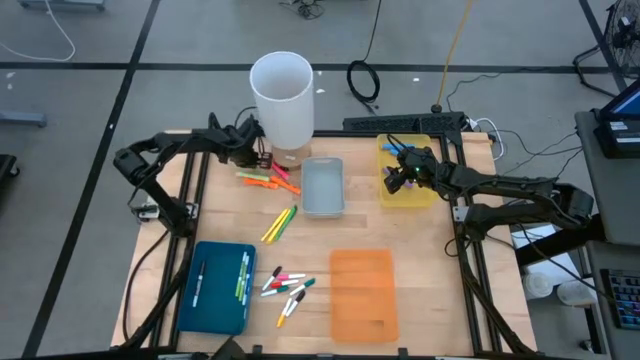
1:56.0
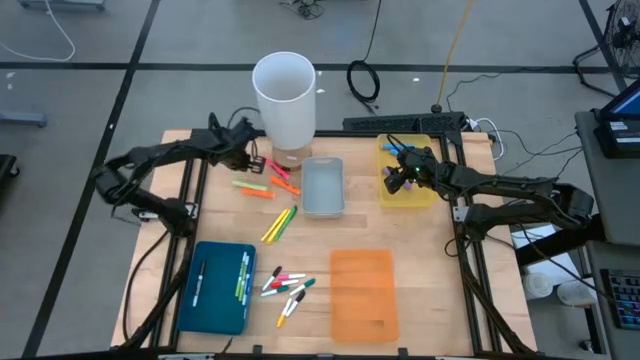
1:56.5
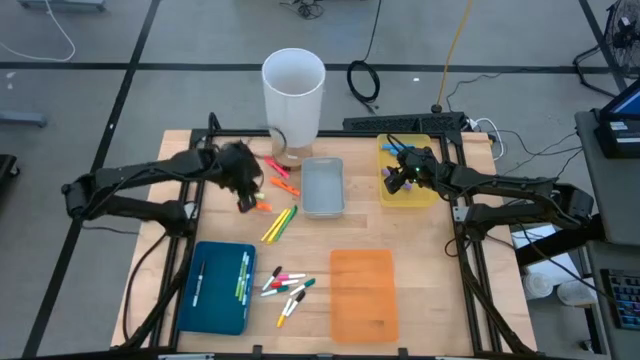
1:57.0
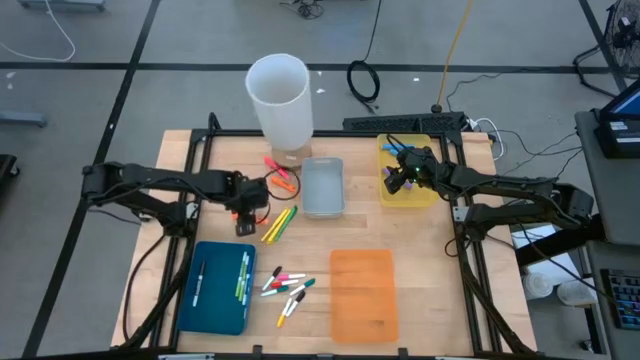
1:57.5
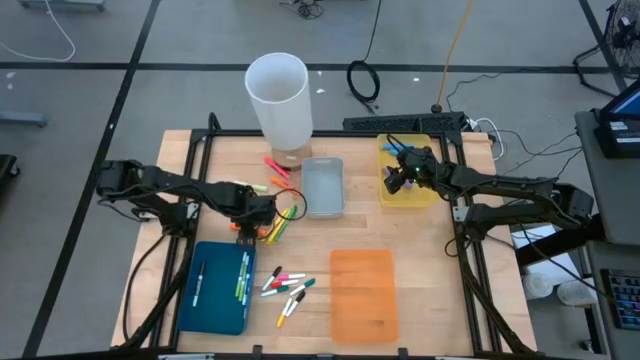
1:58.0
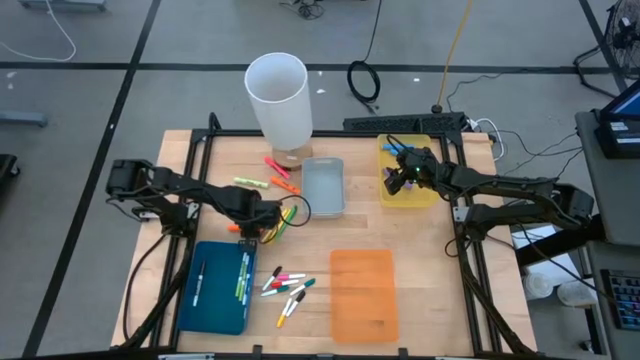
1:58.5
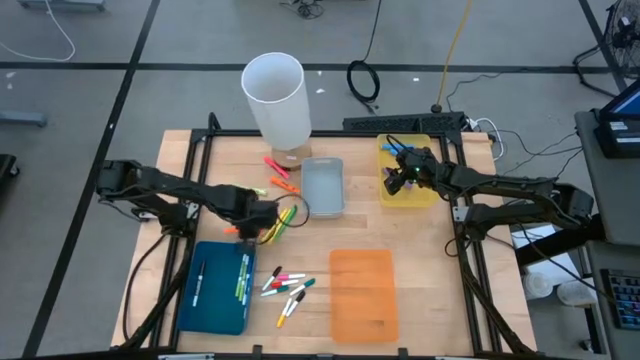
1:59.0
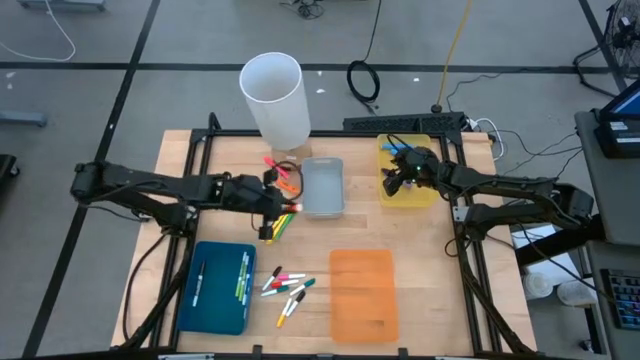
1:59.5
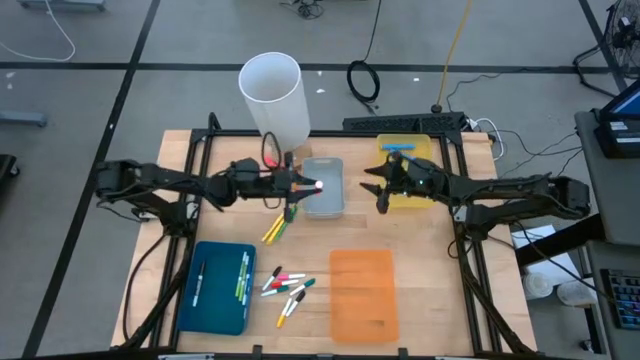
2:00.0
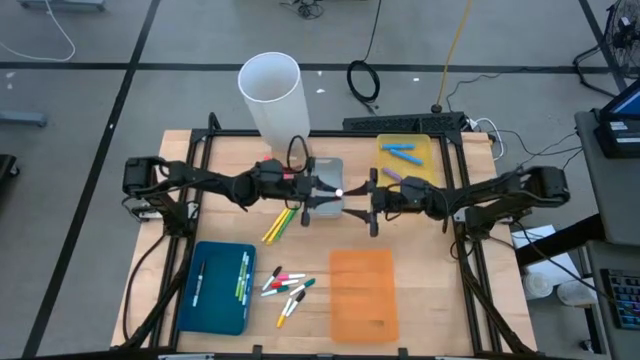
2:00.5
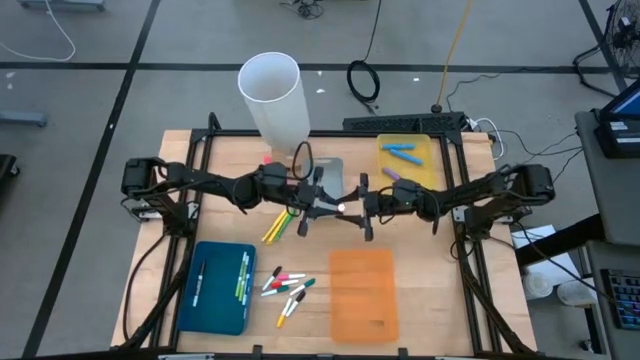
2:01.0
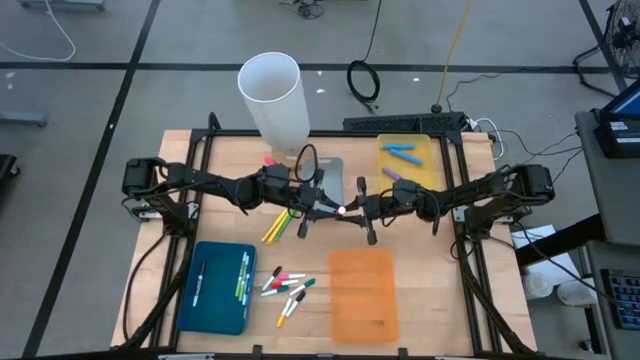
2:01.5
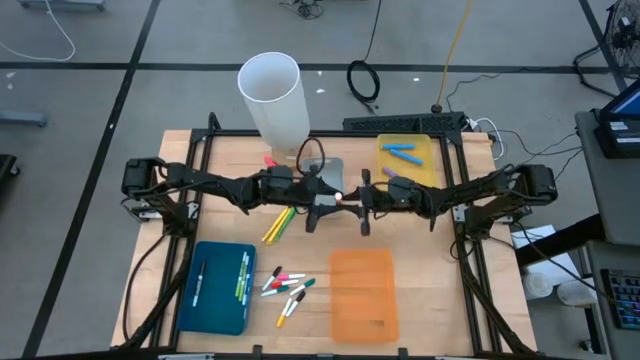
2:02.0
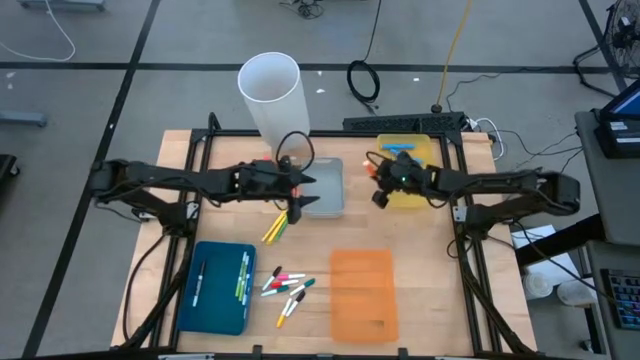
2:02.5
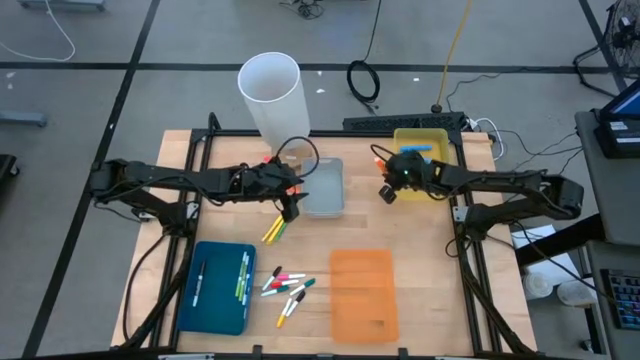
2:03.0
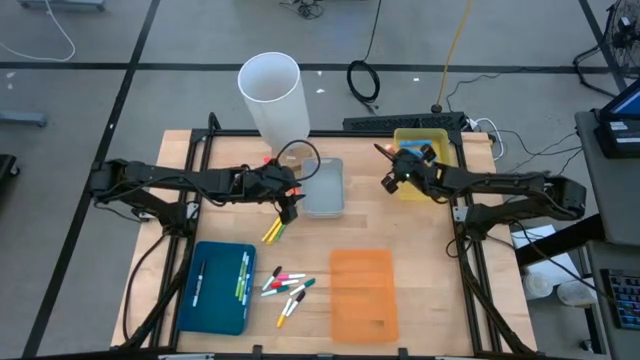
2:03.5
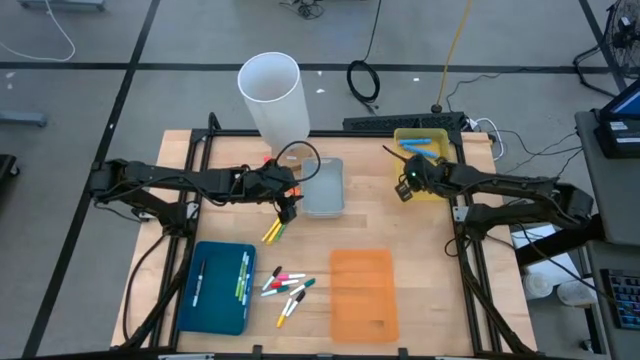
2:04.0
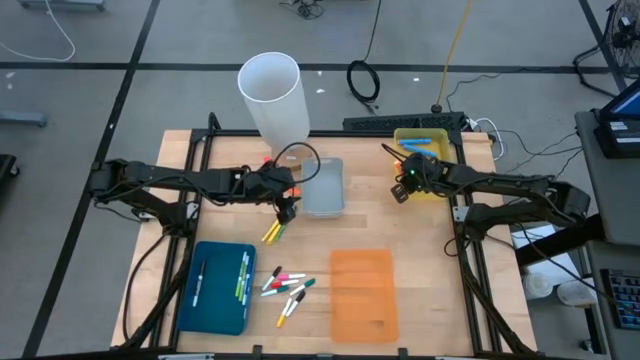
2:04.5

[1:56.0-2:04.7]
Task: Pick & Place Markers
Put the bottom large orange highlighter pen in the yellow bin

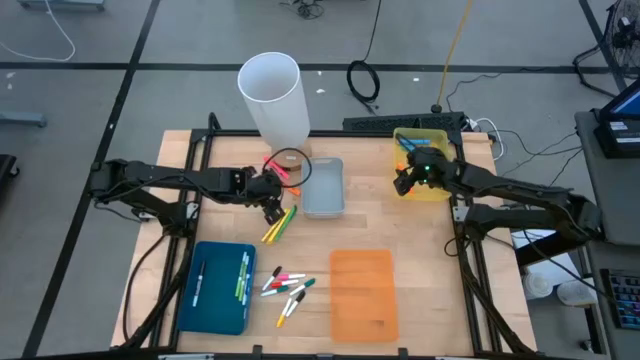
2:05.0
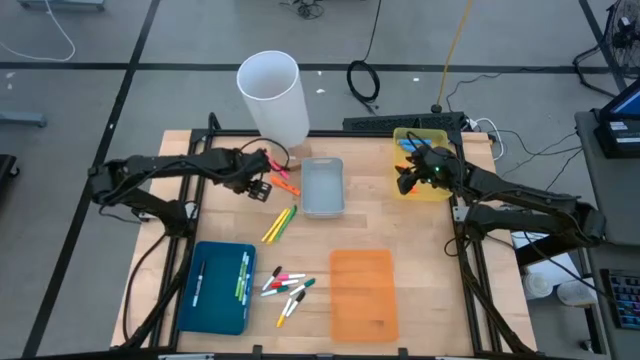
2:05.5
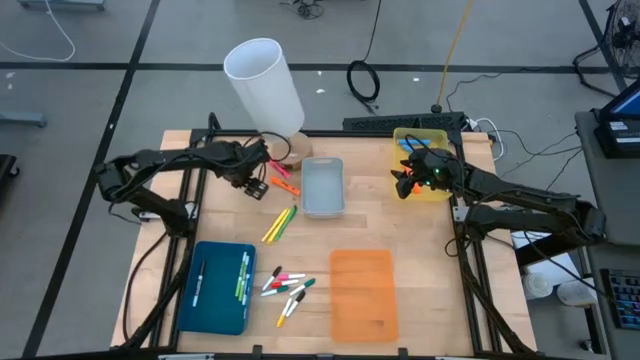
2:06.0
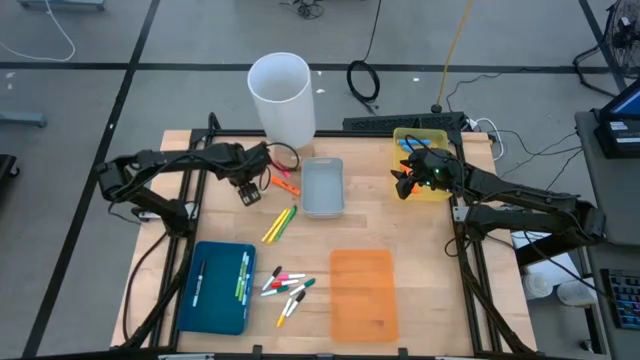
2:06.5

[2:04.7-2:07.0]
Put the large green highlighter pen in the yellow bin

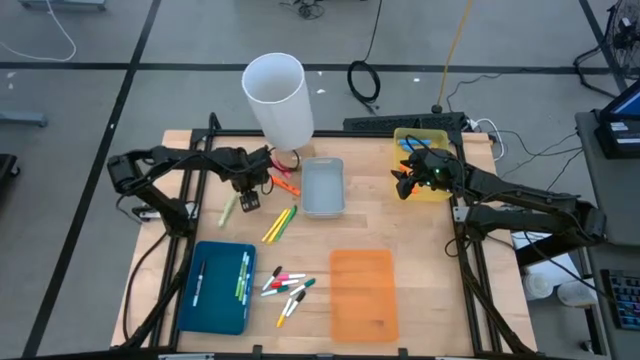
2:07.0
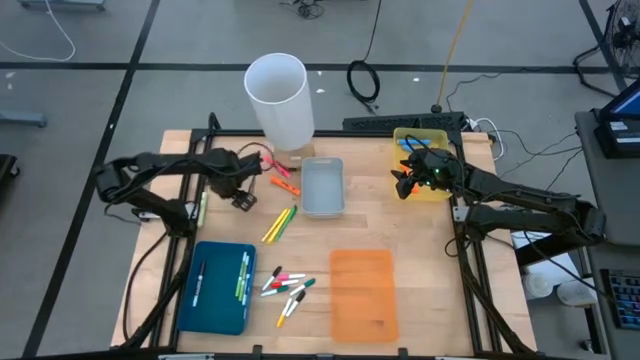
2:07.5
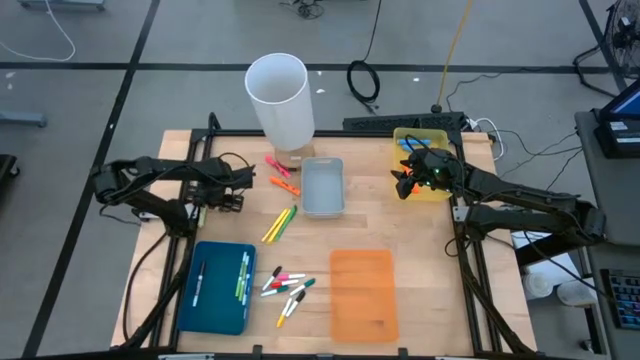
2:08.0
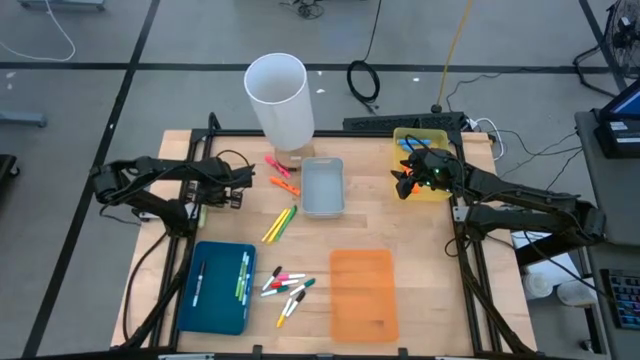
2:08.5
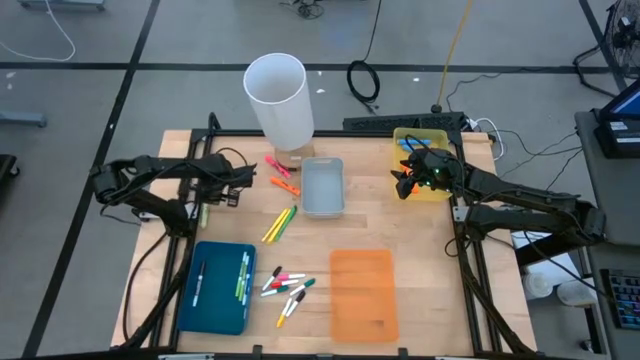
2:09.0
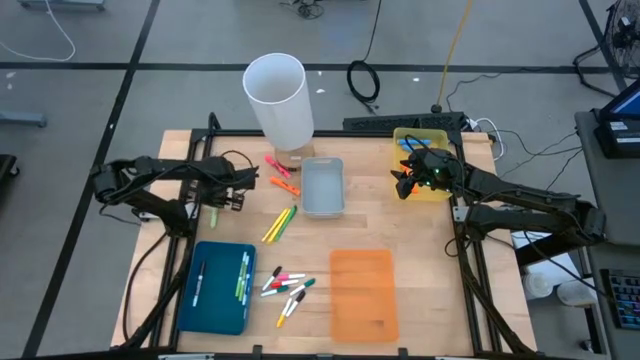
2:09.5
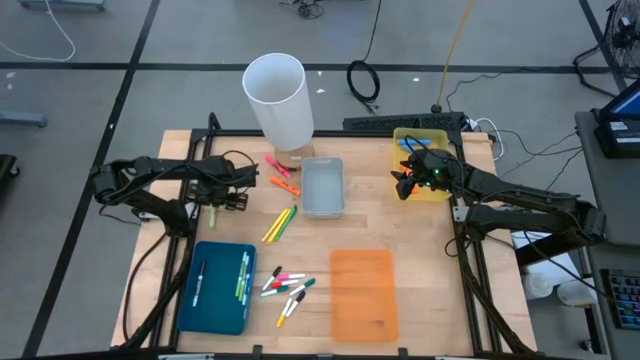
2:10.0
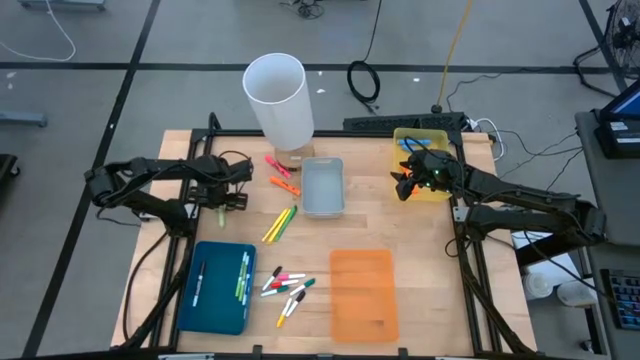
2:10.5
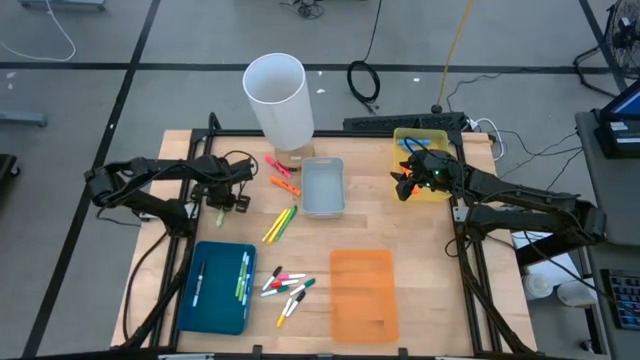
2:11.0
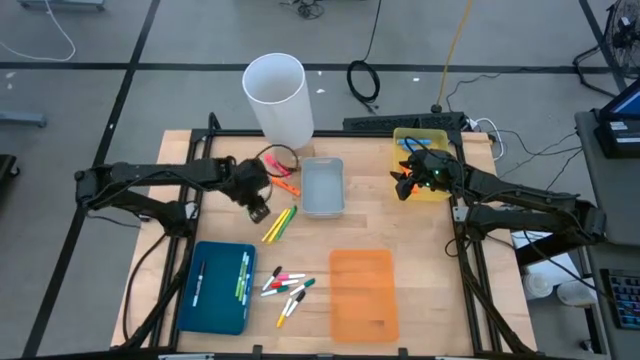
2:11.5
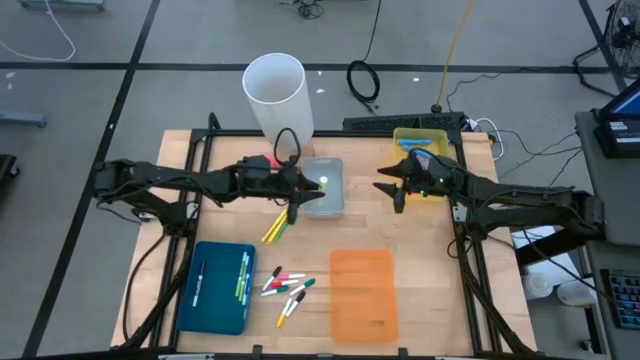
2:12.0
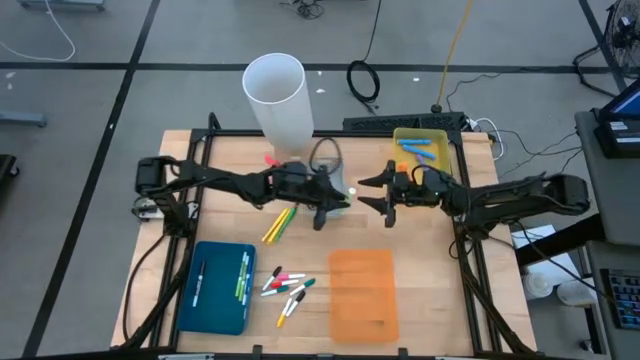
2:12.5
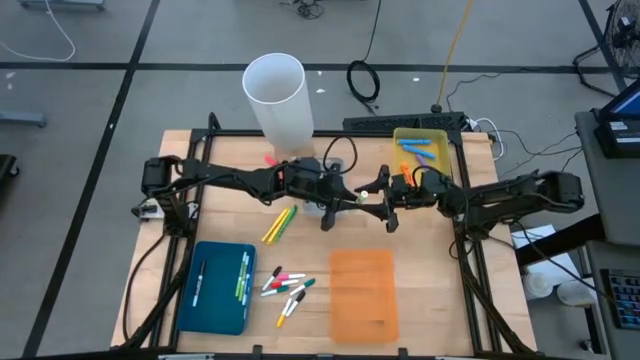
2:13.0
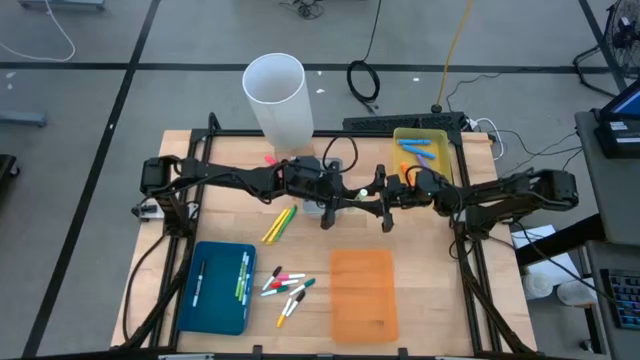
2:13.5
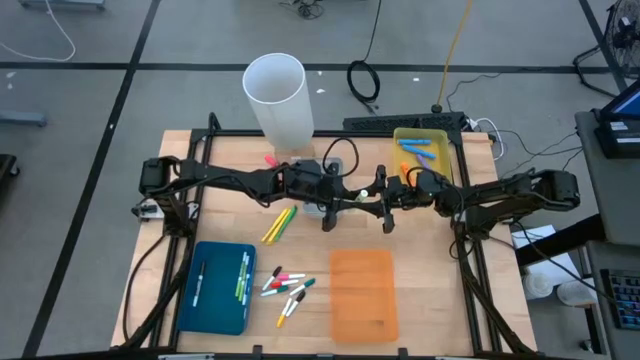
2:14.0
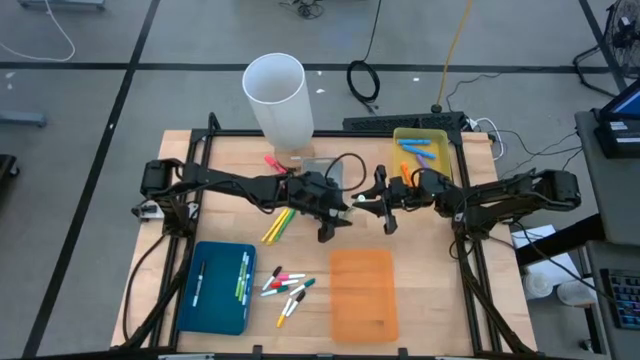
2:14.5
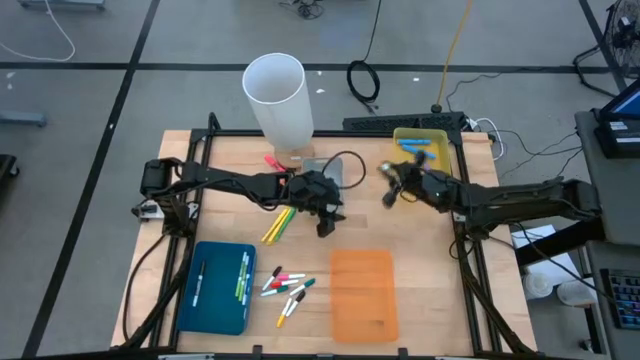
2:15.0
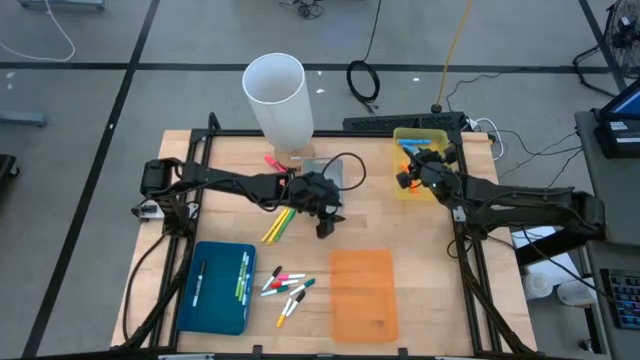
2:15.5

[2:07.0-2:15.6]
Put the large green highlighter pen in the yellow bin

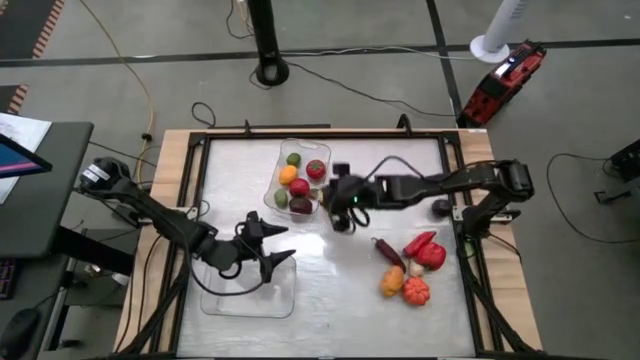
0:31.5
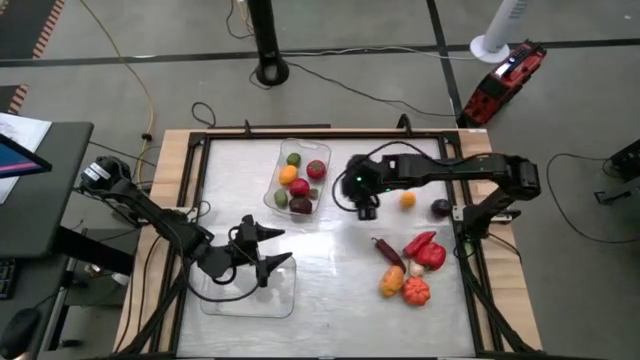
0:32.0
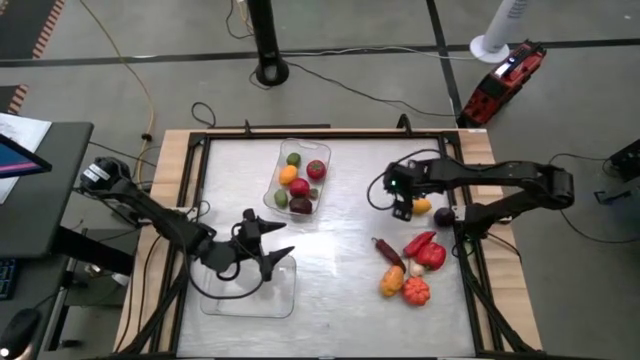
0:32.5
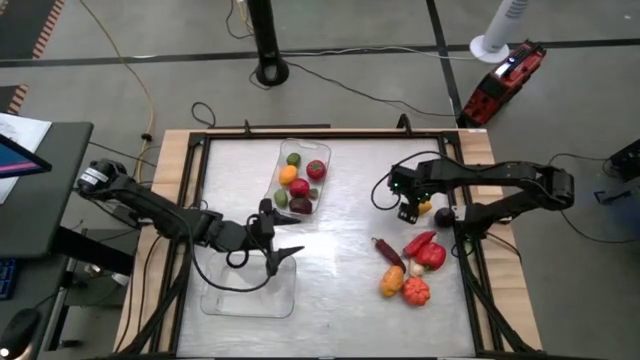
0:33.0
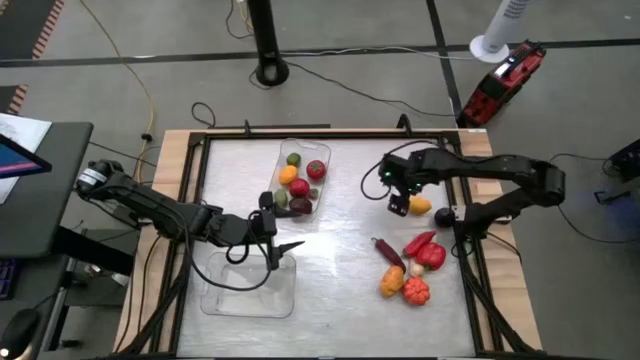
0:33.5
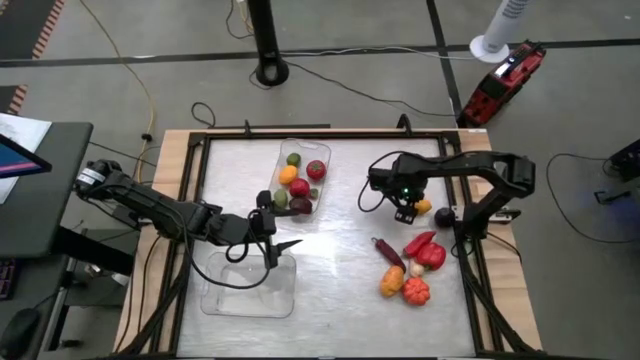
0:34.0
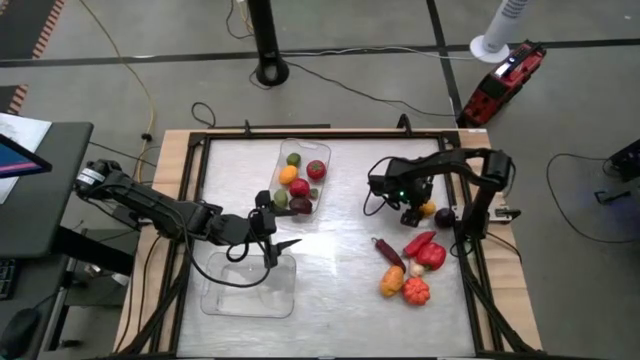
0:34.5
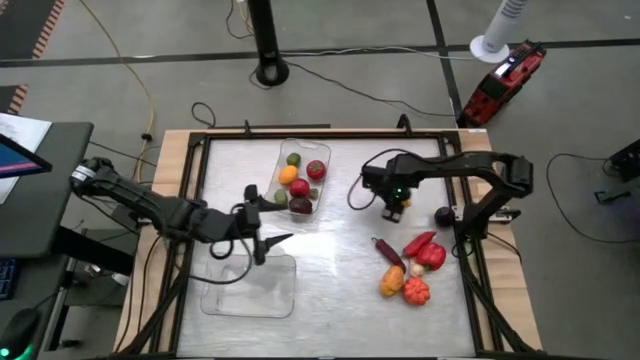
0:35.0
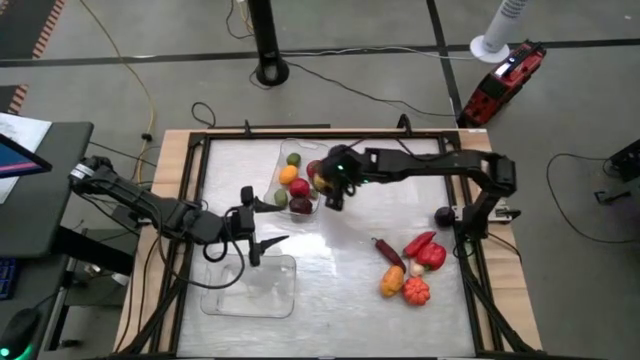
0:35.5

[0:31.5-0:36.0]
Task: Sort produce into baskets
Put the lemon into the top transparent bin
